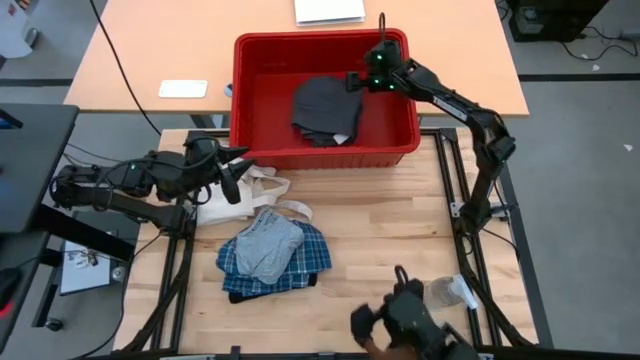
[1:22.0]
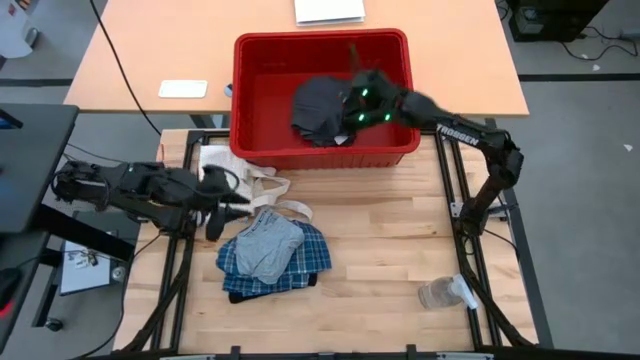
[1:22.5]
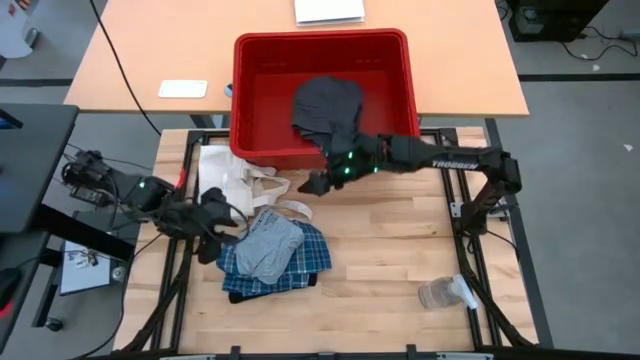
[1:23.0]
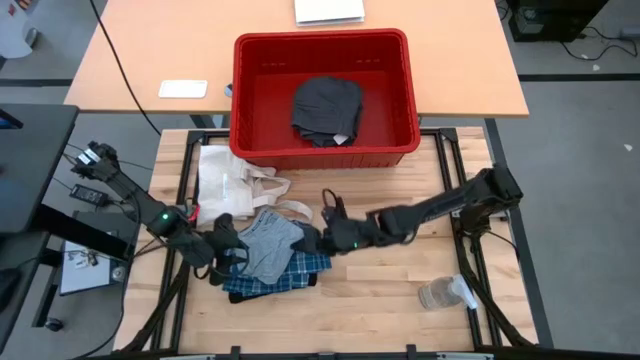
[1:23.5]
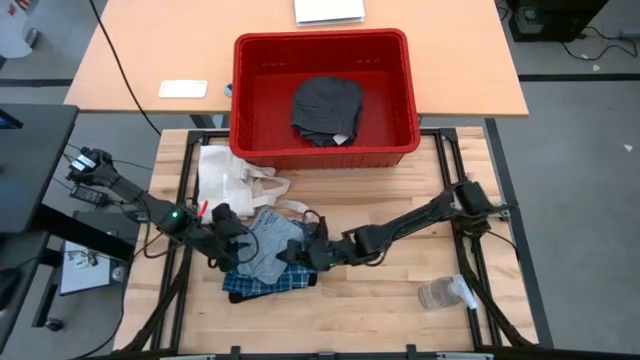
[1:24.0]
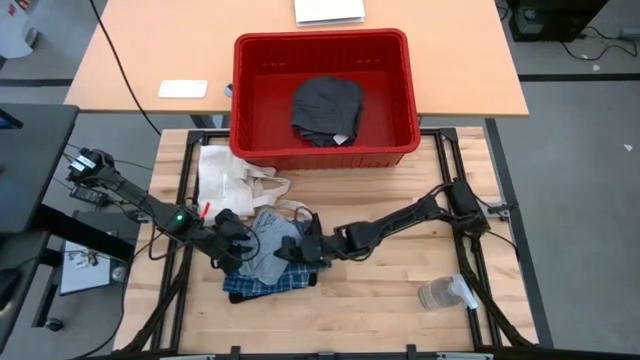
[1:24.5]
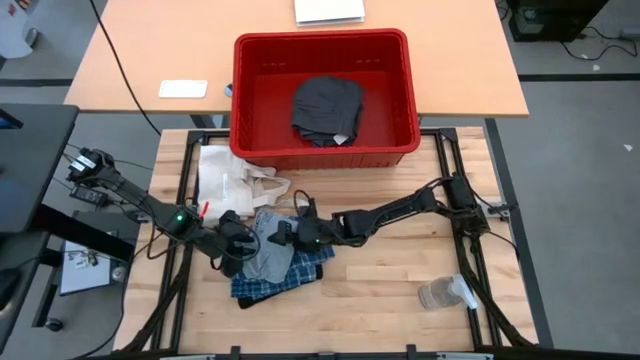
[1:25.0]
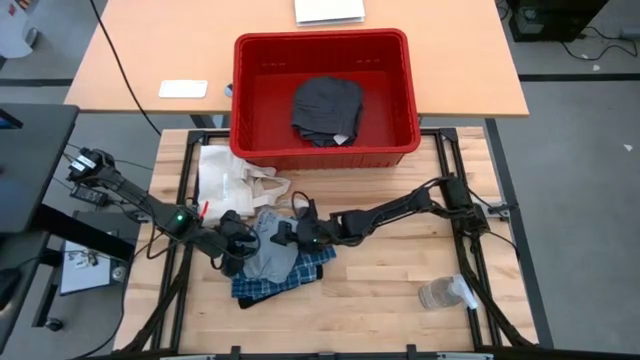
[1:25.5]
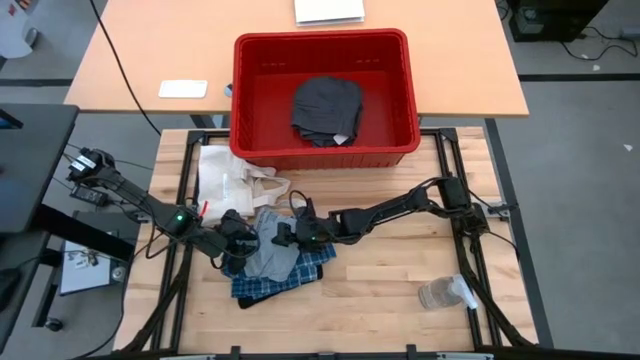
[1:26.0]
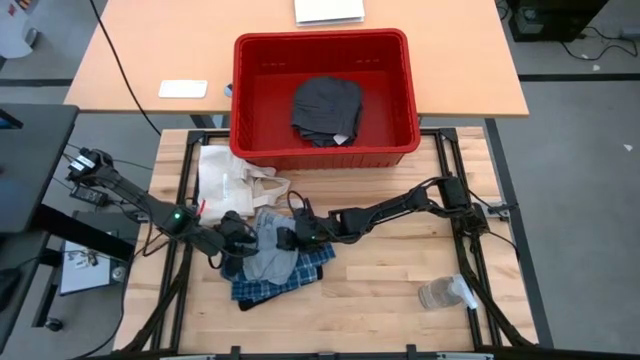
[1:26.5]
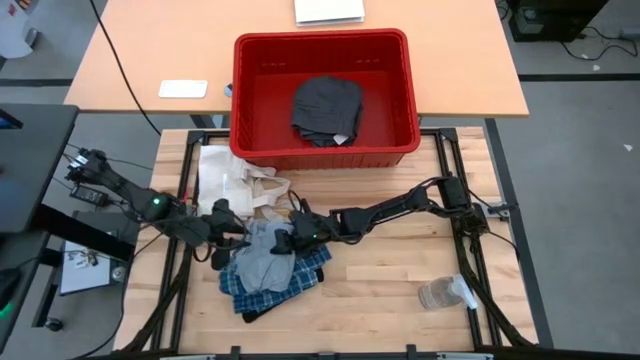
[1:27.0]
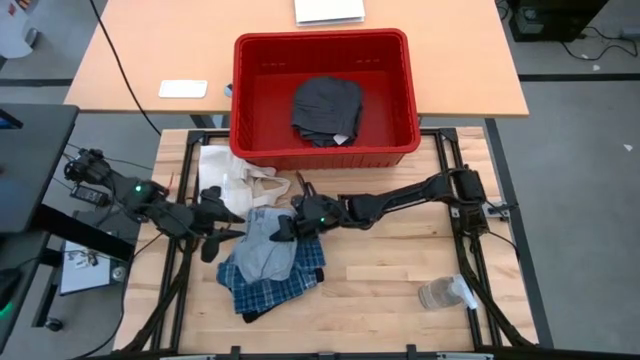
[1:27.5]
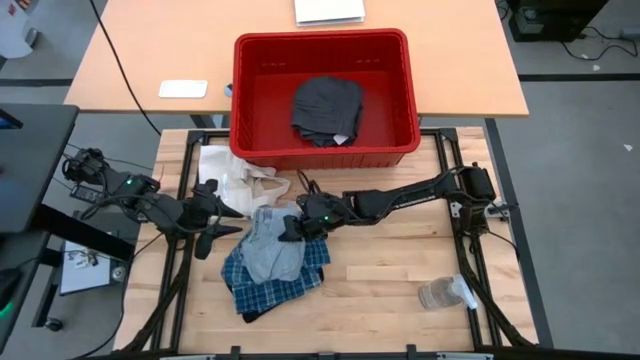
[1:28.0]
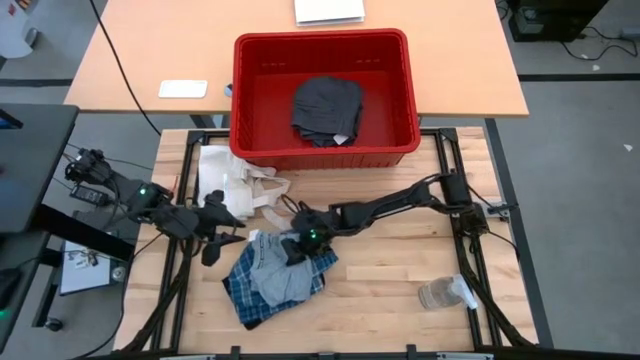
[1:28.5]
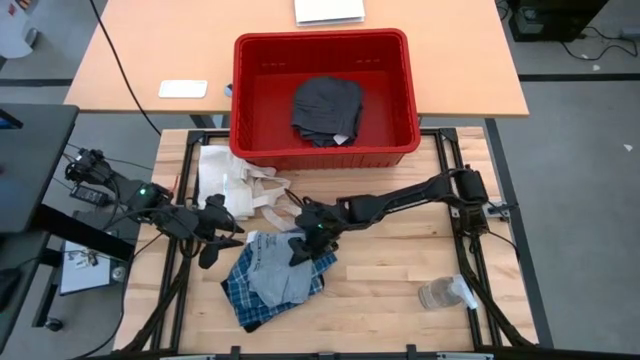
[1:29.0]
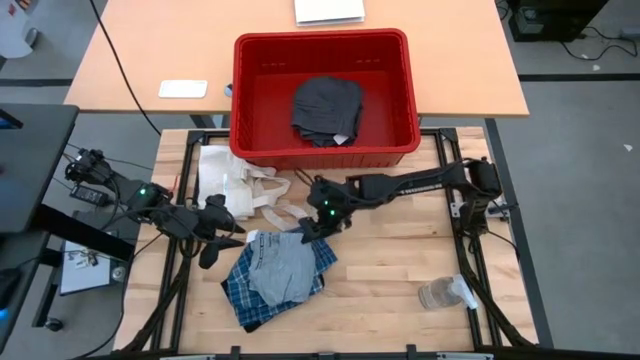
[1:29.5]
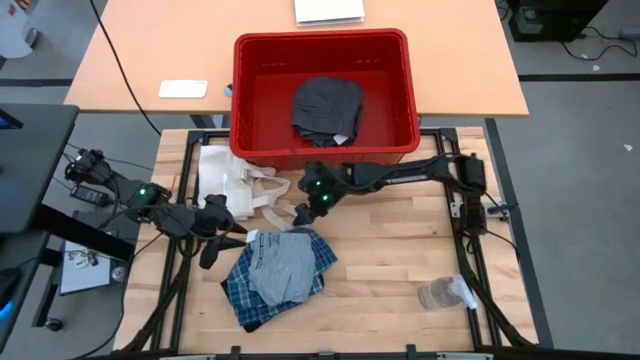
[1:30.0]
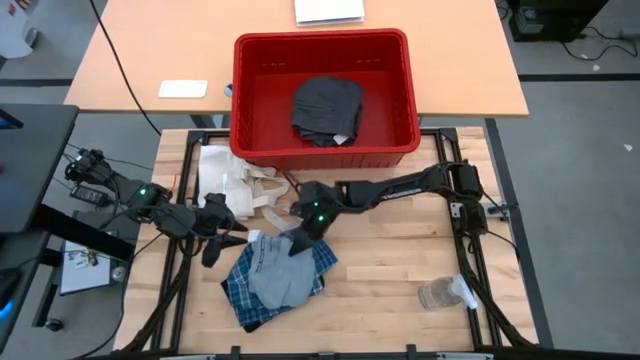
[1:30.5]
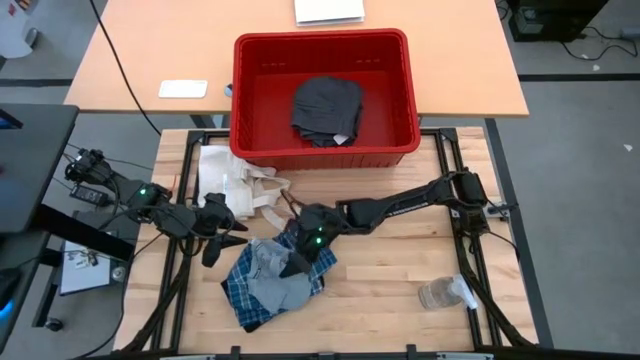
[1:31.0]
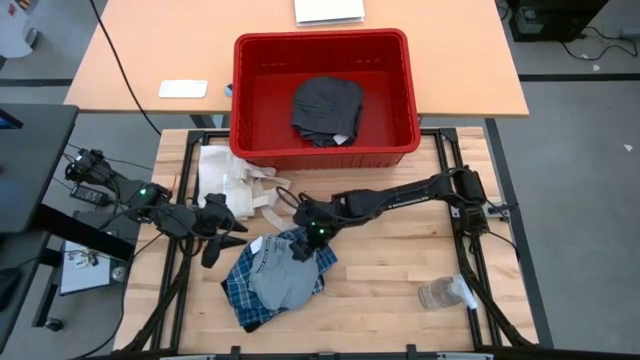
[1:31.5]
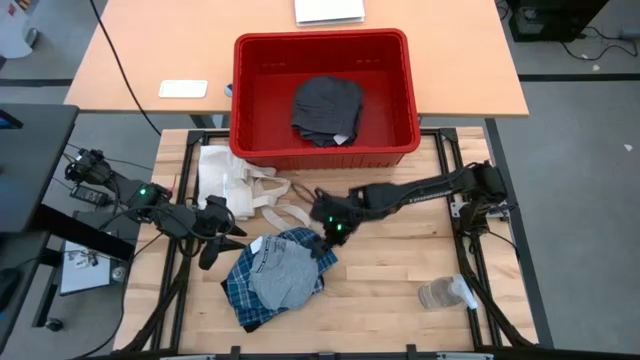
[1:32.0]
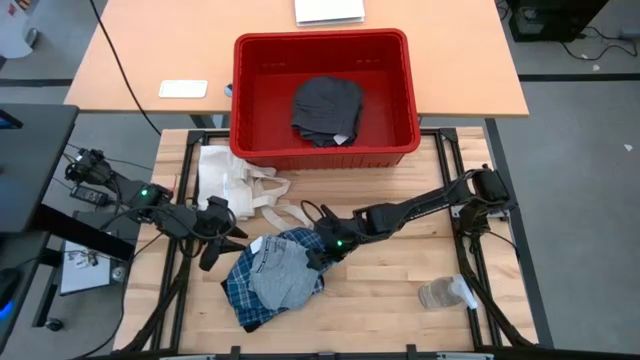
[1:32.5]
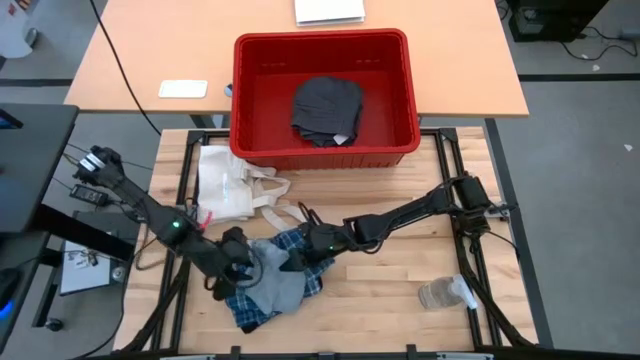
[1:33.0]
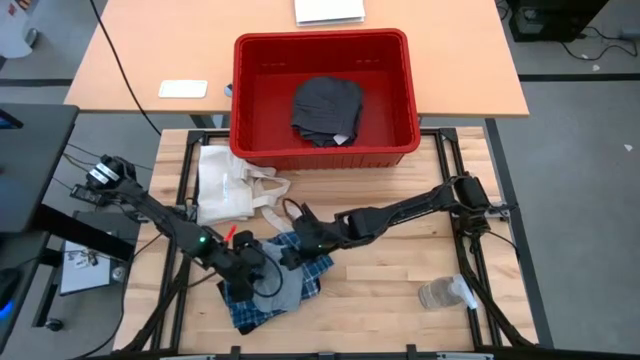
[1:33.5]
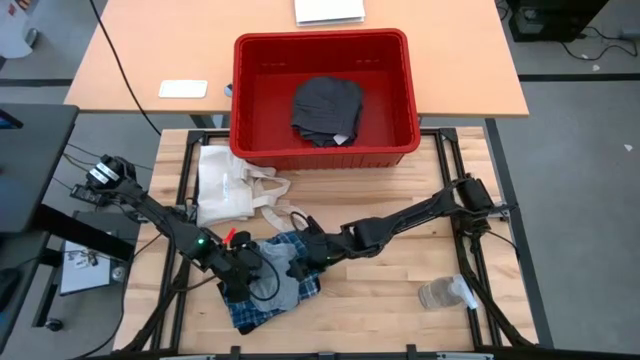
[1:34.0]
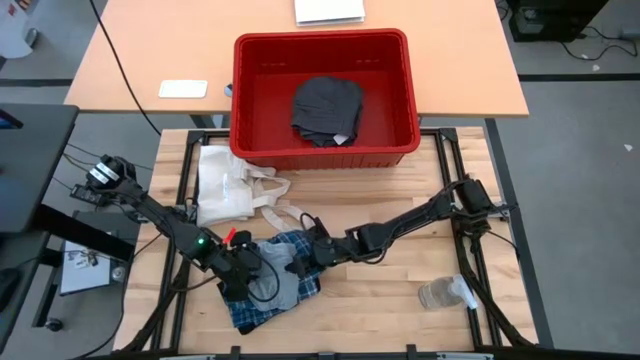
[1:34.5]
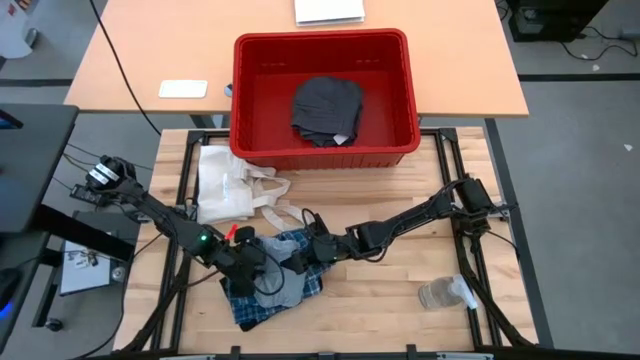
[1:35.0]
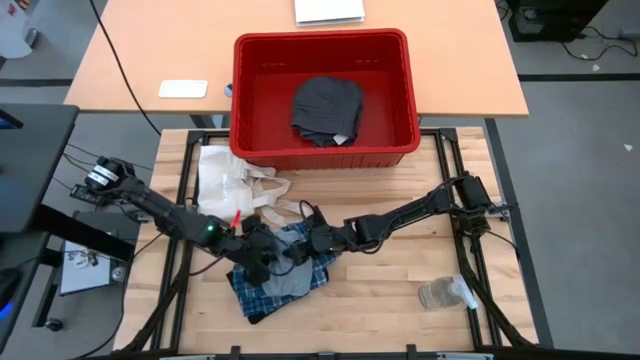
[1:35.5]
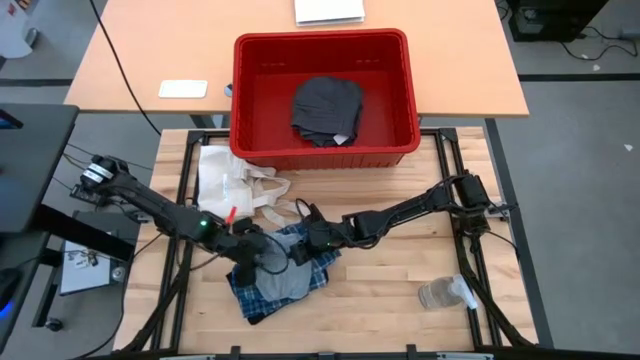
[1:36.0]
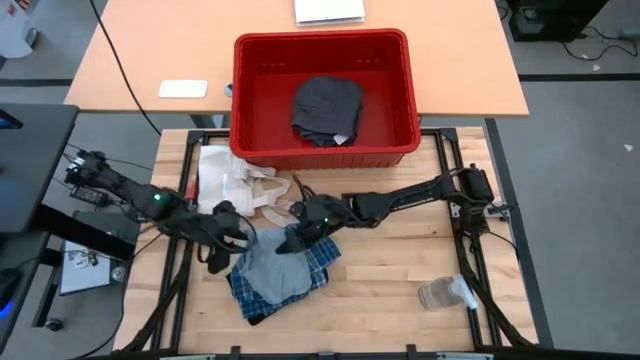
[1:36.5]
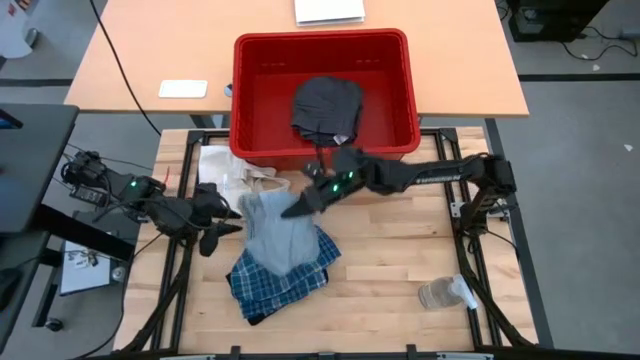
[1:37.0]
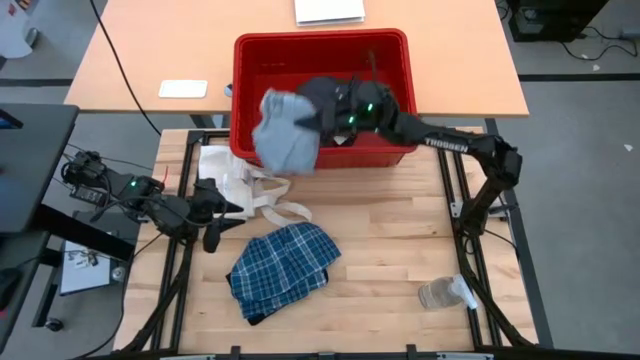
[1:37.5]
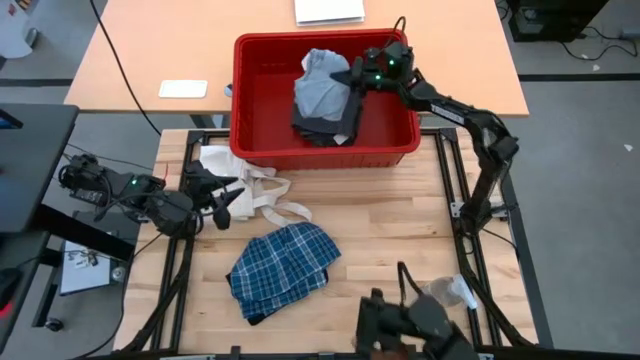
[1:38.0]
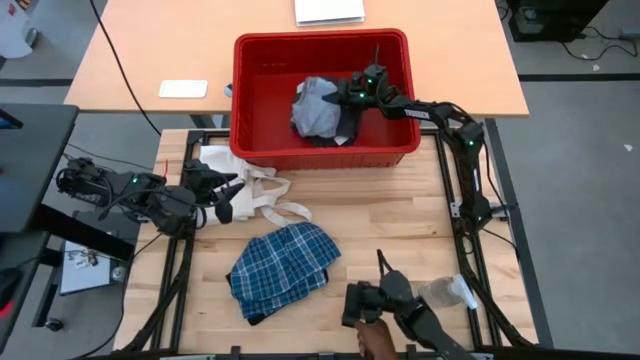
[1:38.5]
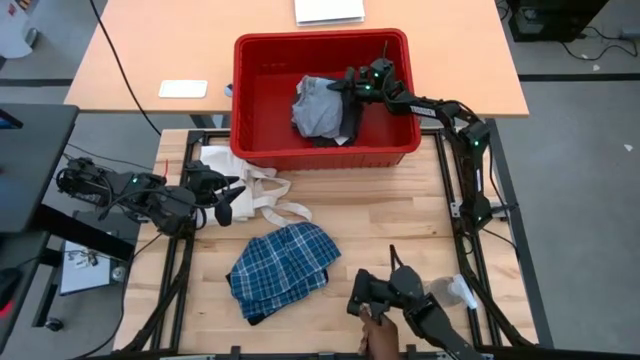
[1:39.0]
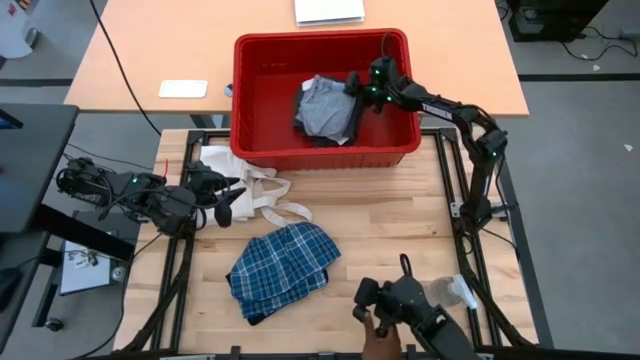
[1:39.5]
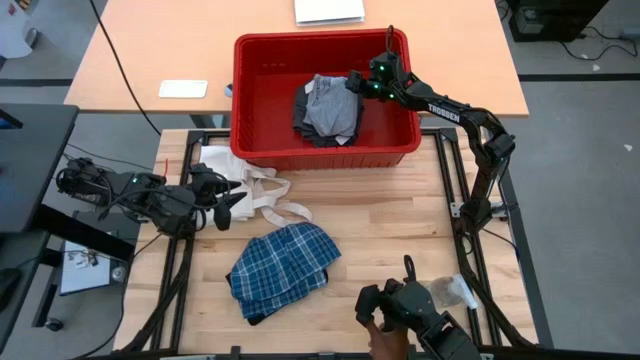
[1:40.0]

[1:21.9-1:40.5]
Task: Fold laundry
Put the gray shirt into the red bin

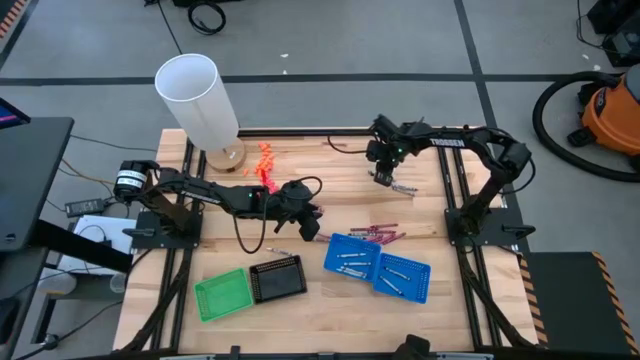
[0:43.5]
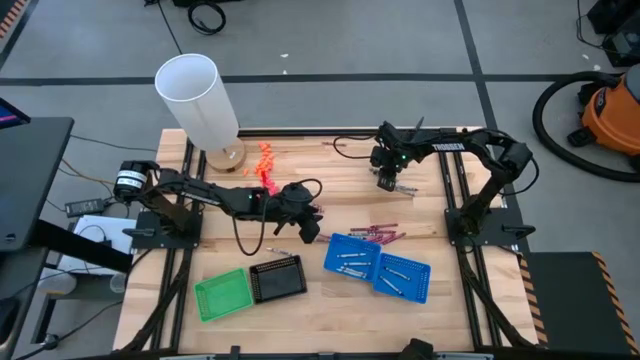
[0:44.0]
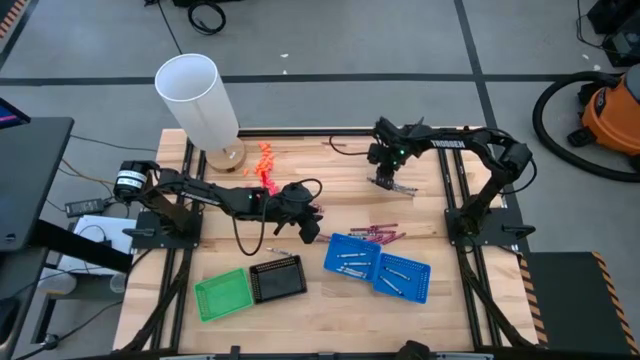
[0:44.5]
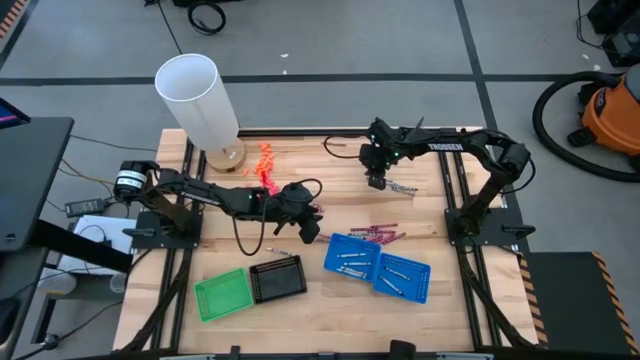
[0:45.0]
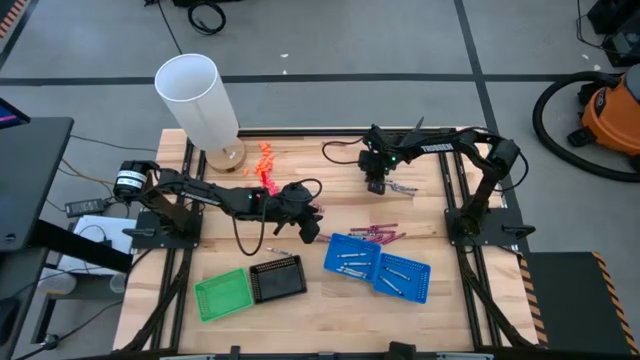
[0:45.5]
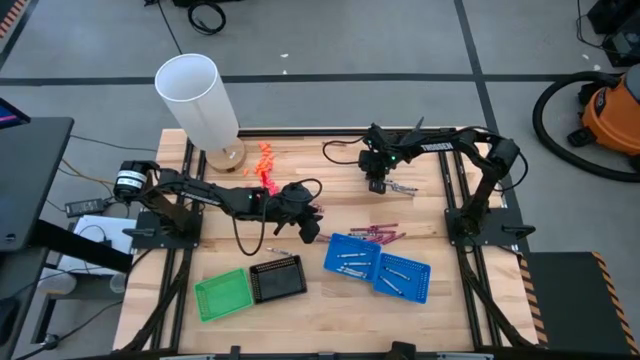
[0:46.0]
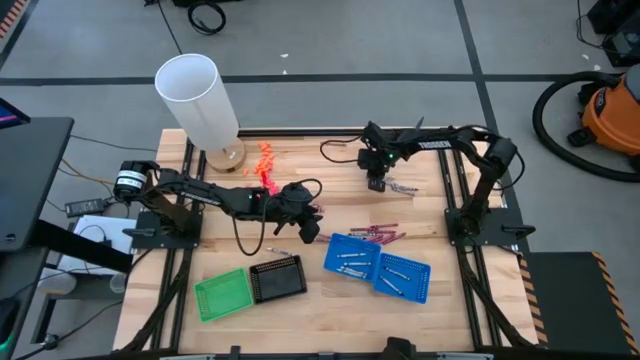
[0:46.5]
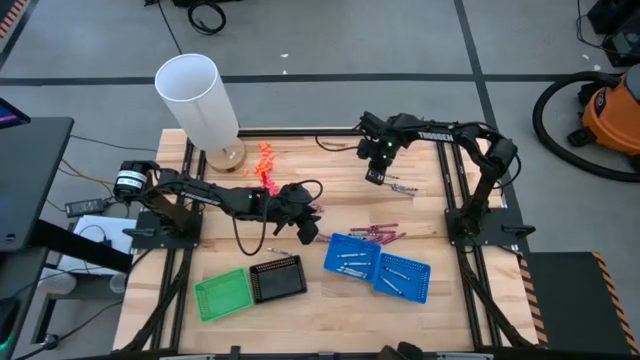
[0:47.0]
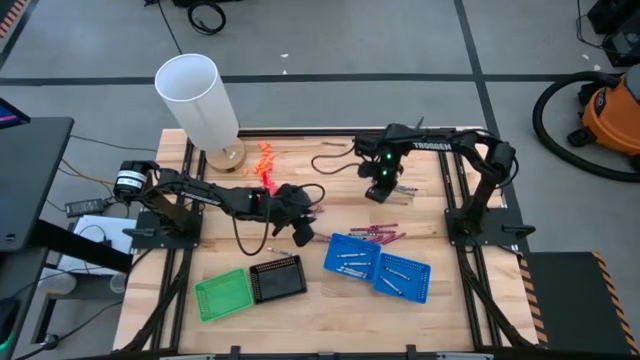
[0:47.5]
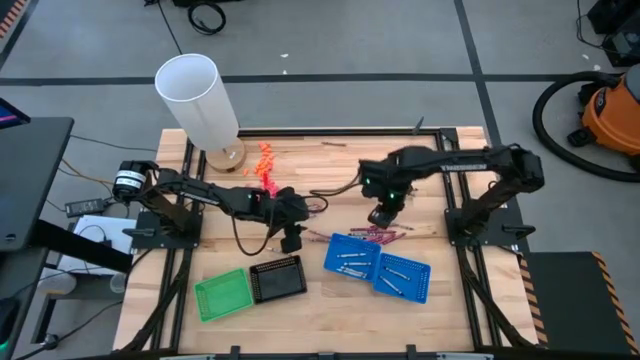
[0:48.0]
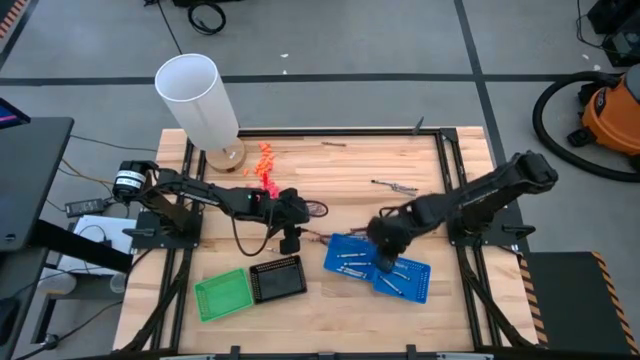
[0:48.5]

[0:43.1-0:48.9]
Task: Sort crayons
Put the black crayon into the right blue bin
